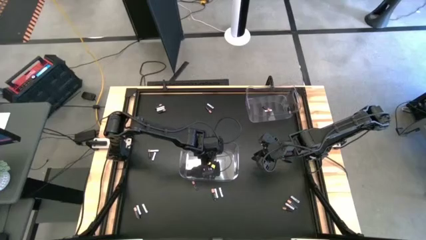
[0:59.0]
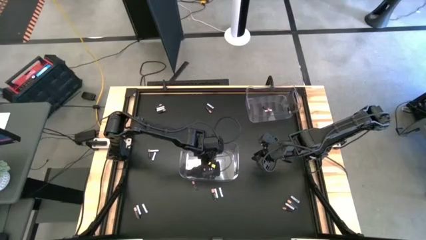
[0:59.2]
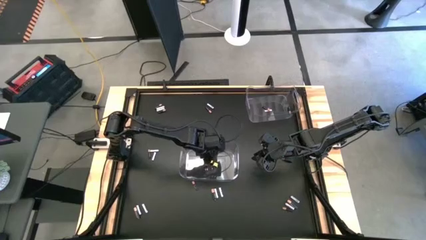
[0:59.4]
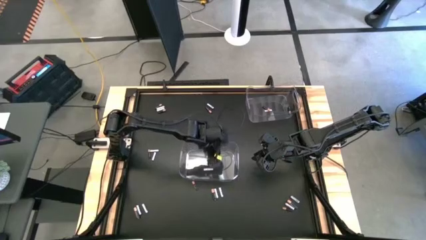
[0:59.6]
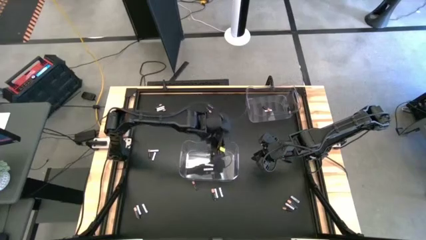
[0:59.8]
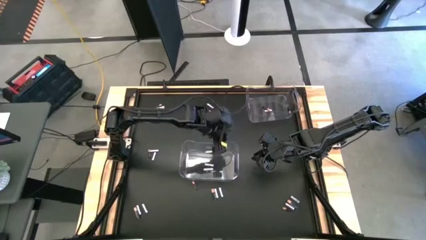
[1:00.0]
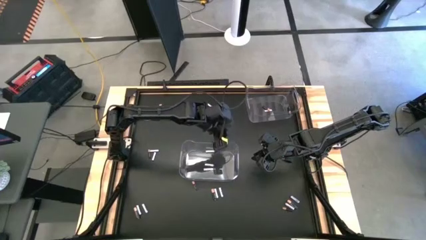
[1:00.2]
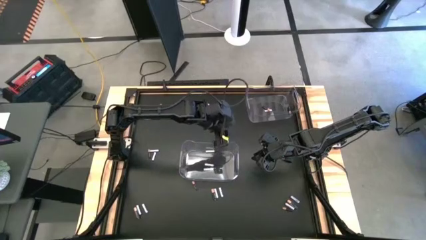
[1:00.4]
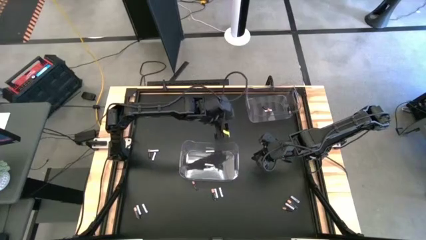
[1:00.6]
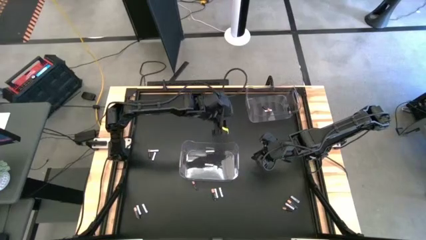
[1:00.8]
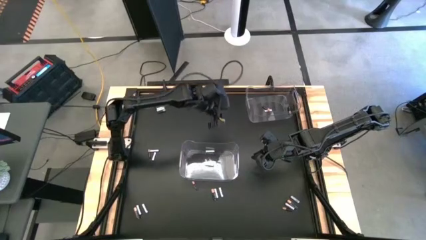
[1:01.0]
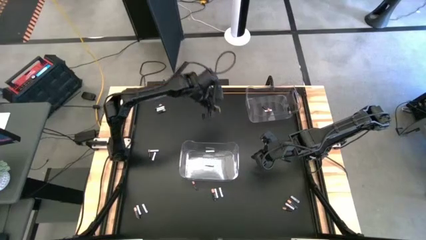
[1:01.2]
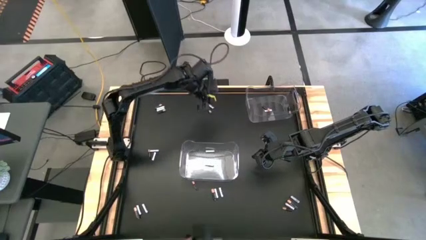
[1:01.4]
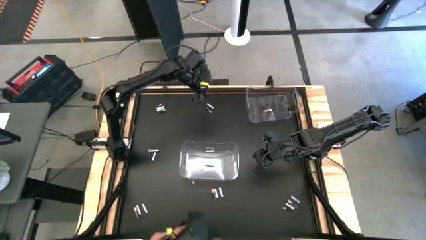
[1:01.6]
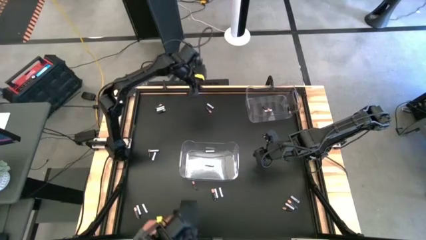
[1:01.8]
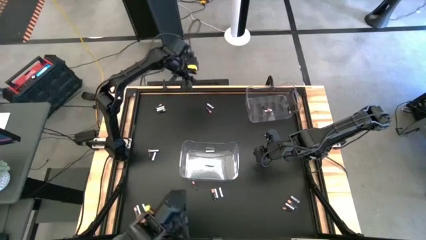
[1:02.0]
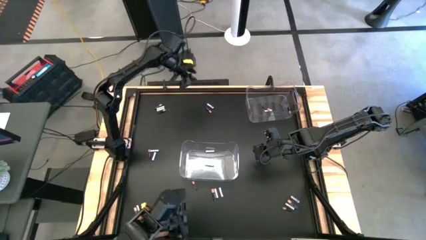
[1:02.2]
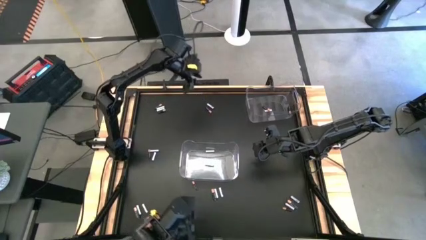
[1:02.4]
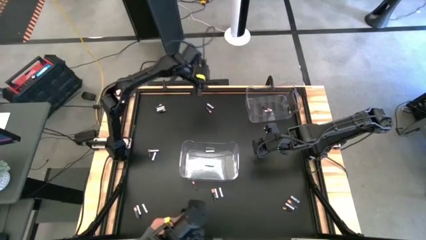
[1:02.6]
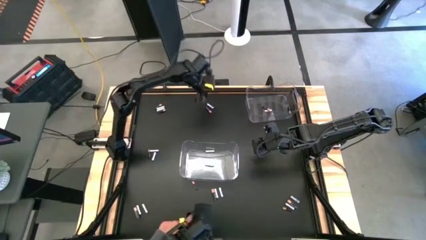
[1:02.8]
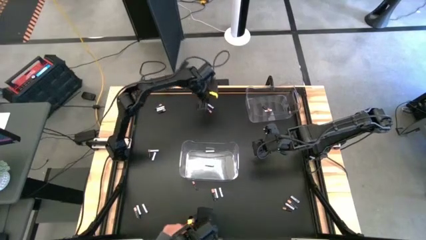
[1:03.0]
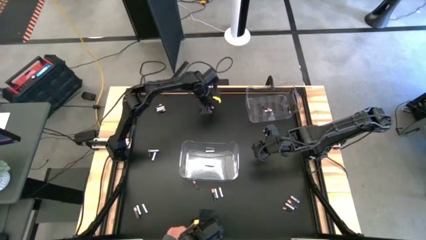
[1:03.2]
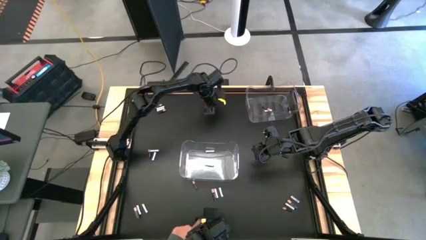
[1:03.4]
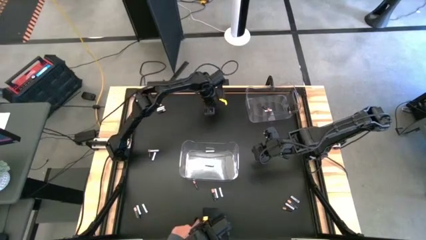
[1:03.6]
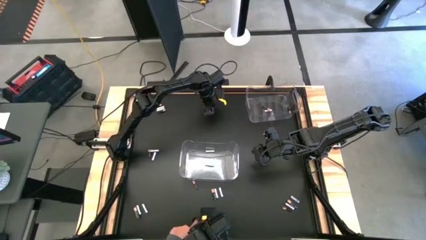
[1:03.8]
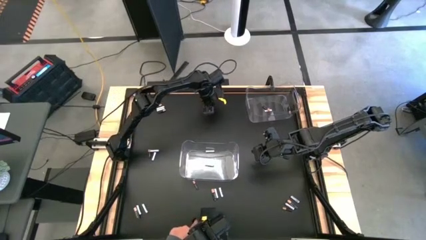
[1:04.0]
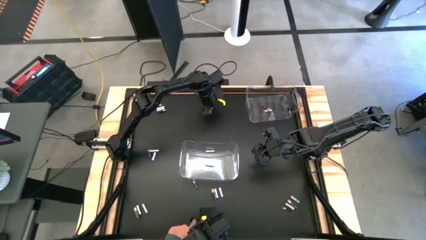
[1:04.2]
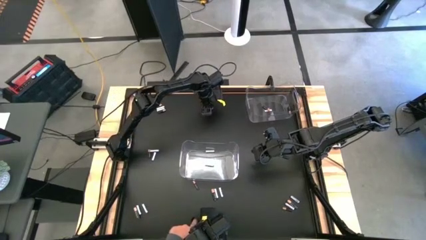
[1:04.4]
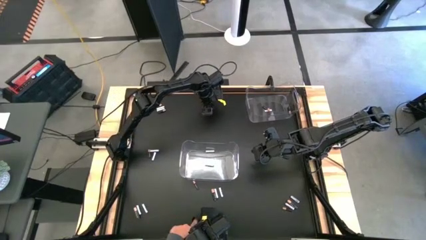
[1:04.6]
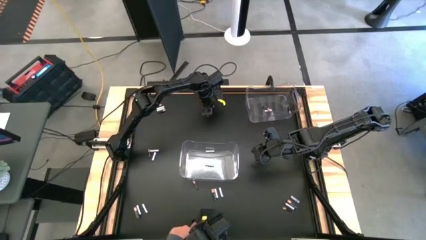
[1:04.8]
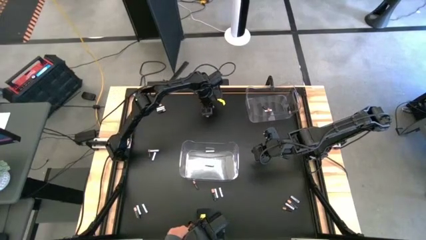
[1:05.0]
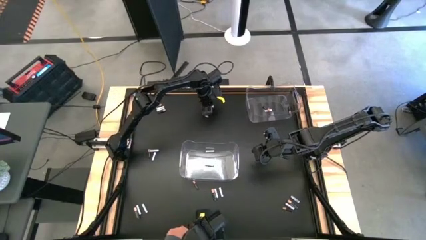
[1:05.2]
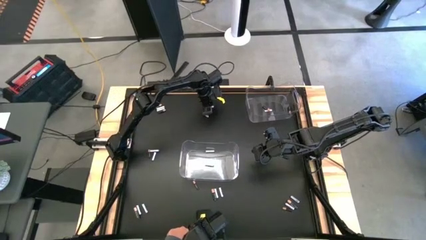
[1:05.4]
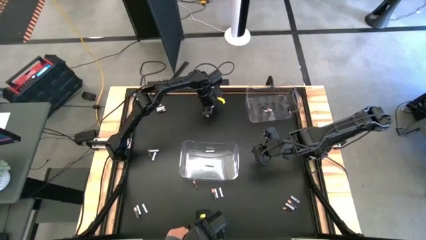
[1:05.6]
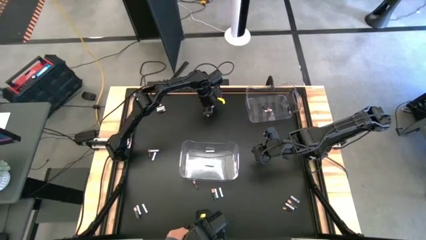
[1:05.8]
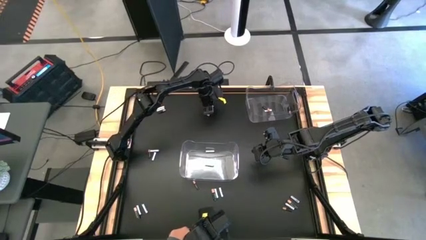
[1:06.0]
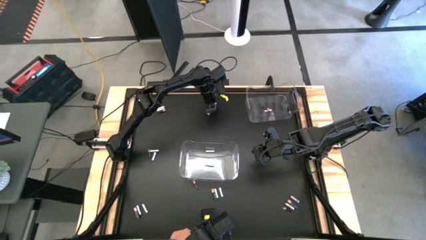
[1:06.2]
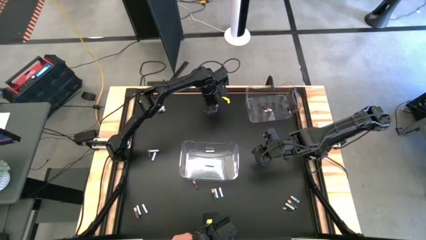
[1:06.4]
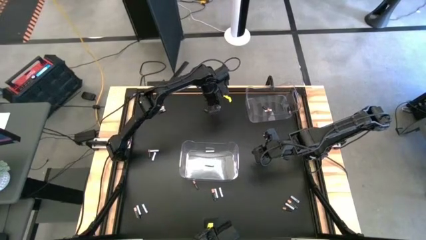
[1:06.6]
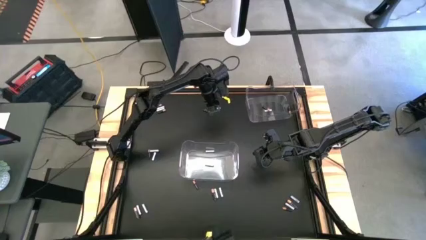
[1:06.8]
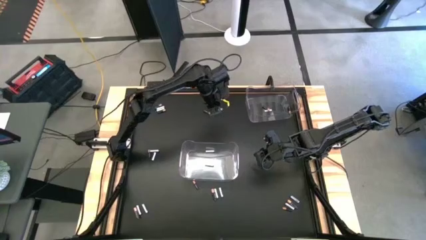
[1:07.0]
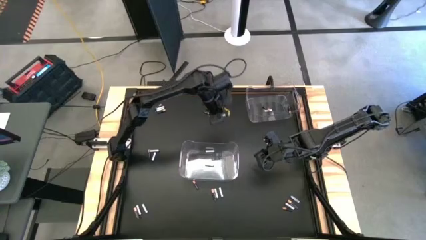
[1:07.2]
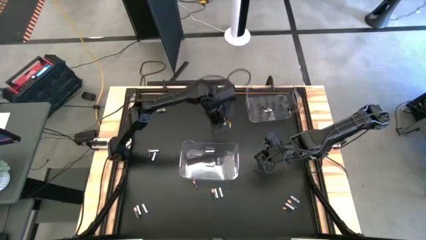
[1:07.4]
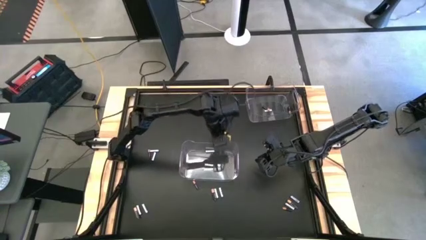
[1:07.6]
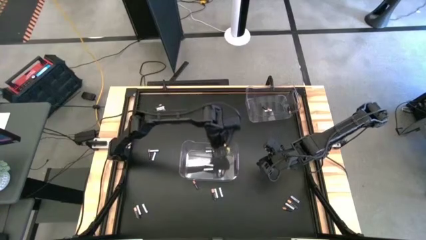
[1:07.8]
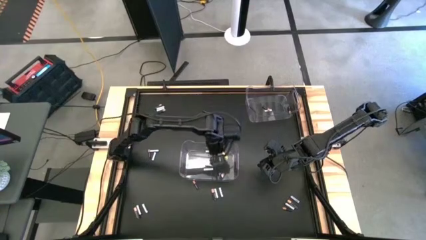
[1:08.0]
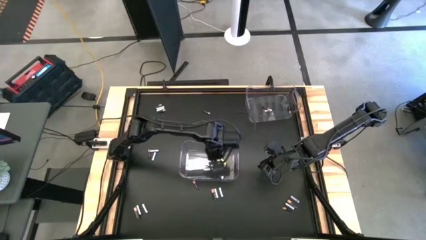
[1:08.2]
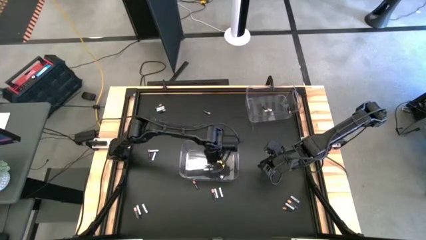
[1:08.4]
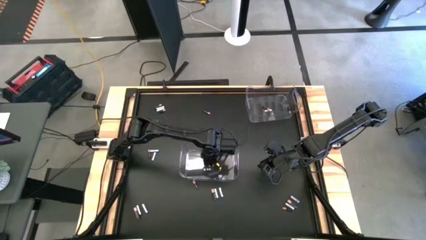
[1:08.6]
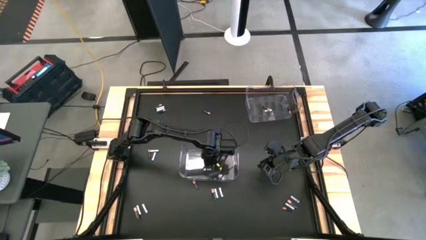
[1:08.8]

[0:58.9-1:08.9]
Task: Sort batteries
Put the white battery into the bottom transparent bin

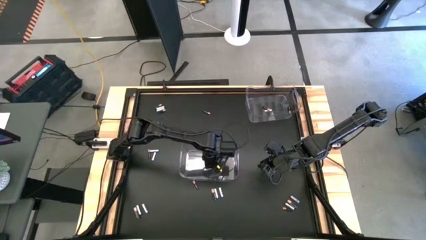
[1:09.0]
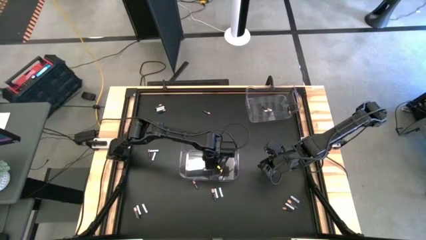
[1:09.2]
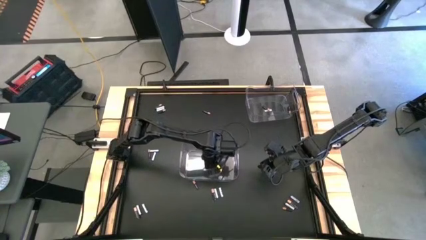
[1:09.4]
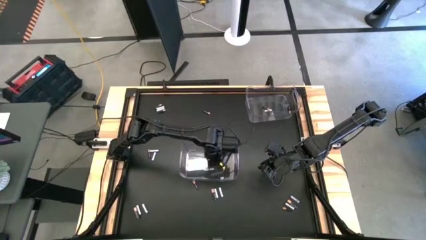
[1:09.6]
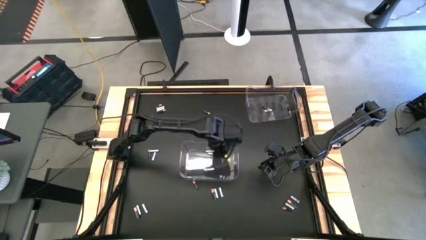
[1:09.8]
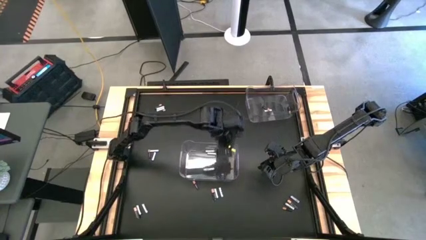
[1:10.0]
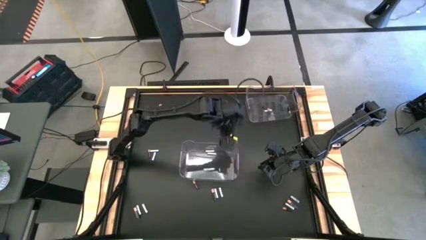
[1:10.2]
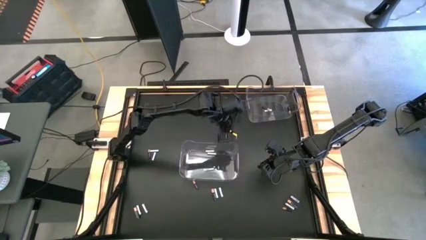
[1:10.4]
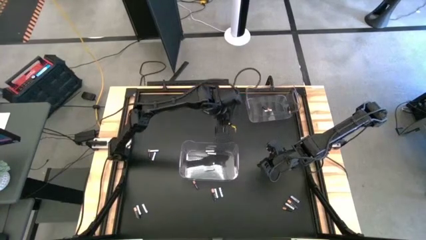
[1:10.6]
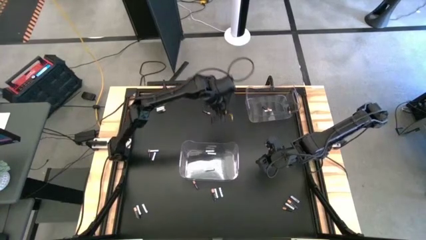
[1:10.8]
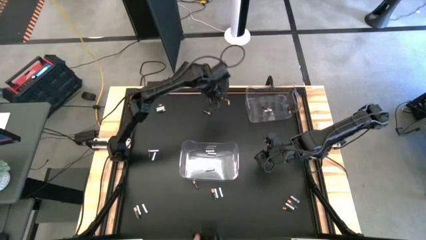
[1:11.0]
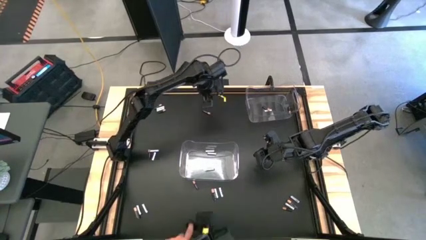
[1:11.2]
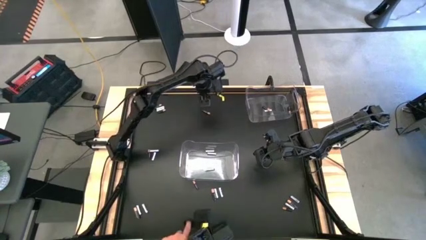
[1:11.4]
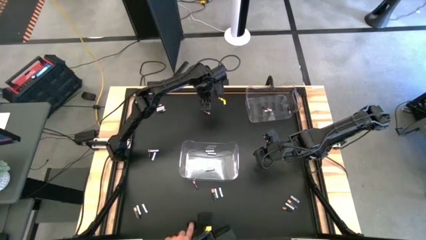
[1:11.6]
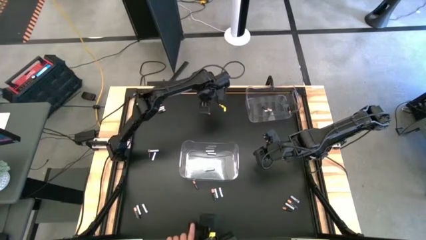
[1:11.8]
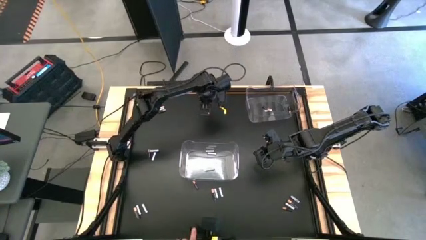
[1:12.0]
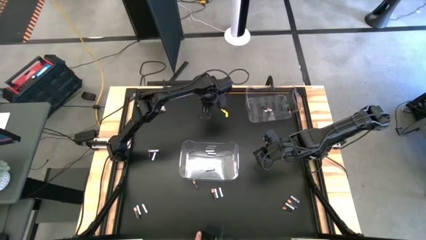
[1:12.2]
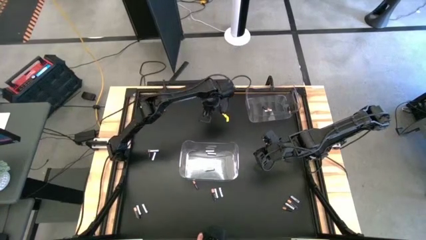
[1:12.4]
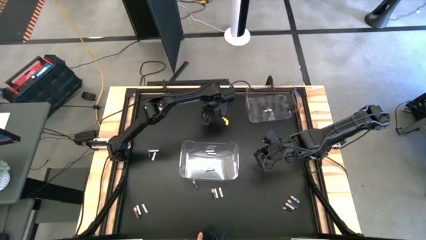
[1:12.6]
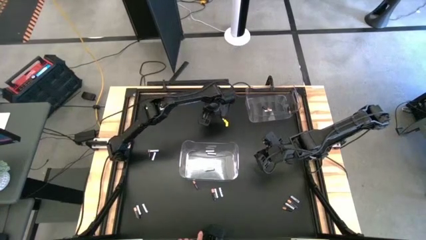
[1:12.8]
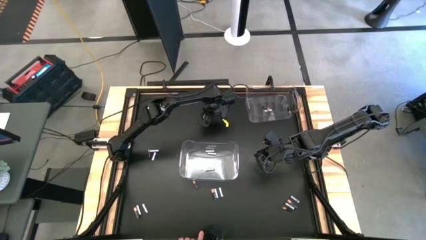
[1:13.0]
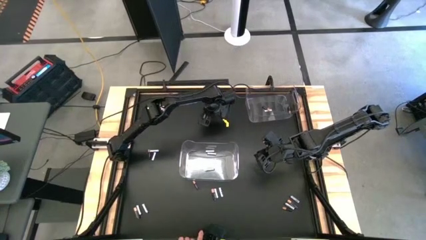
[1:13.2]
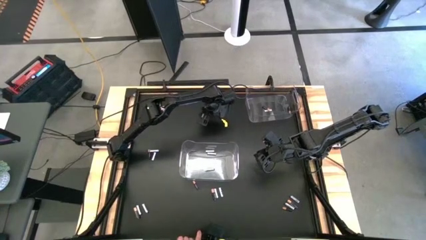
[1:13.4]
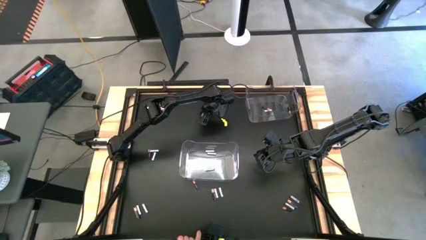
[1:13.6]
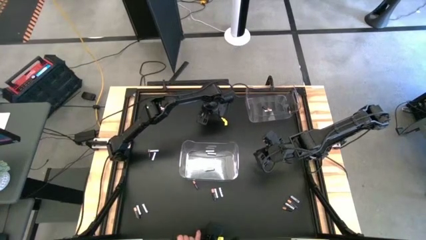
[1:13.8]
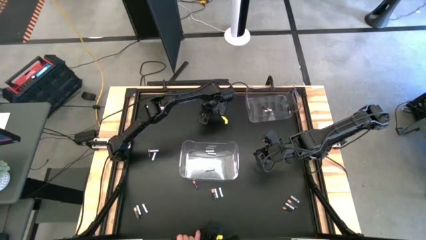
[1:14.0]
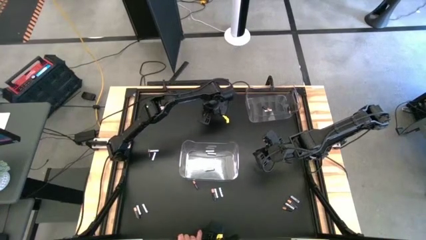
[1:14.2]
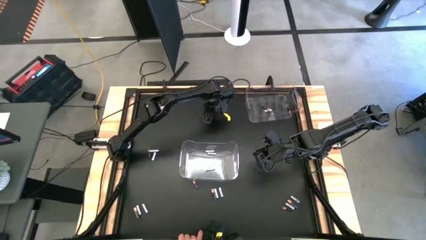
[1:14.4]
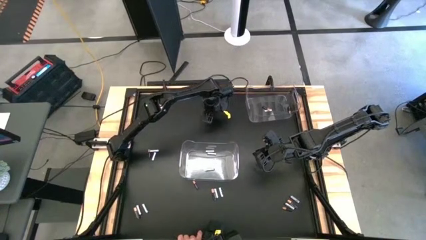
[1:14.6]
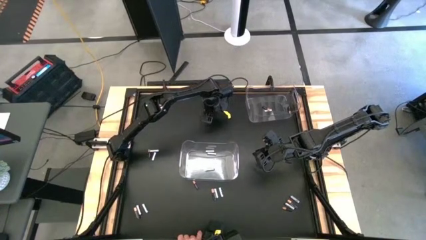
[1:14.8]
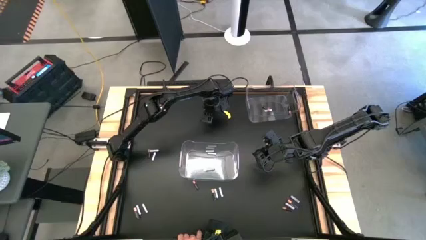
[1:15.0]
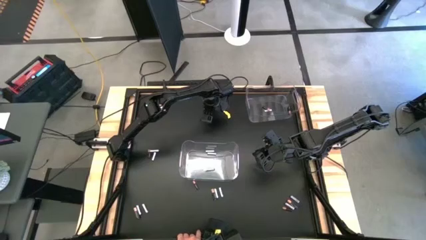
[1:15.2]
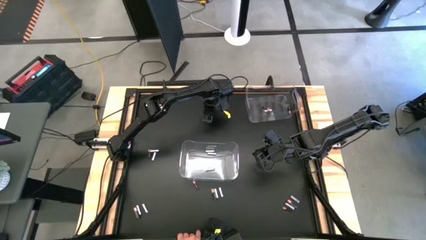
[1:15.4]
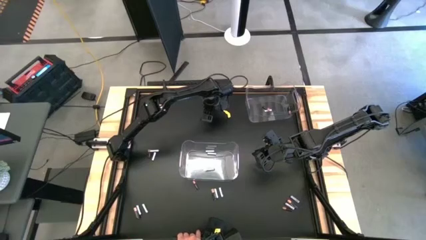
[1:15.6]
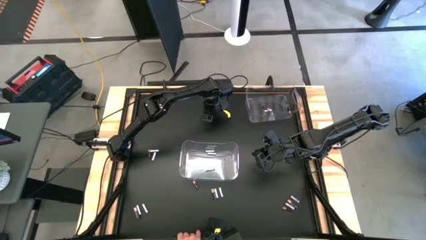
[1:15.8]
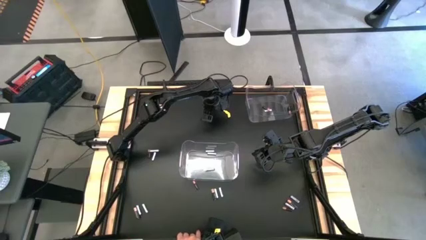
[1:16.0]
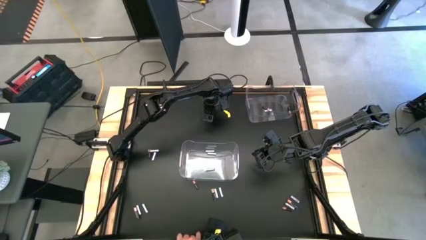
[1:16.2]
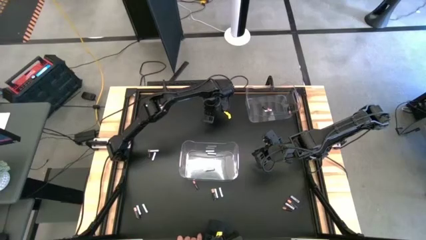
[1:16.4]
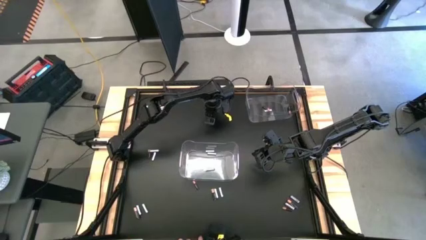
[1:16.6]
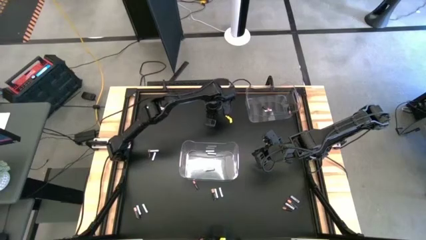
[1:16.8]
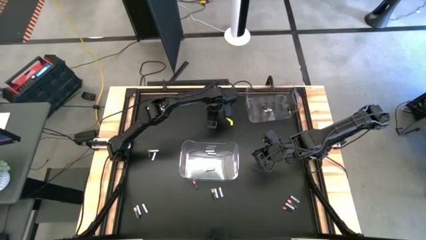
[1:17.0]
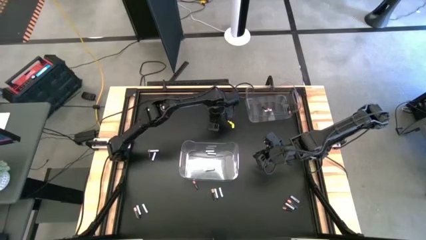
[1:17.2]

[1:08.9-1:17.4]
Put the black battery into the top transparent bin
